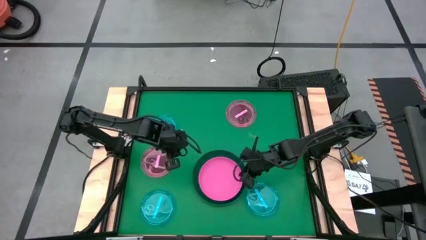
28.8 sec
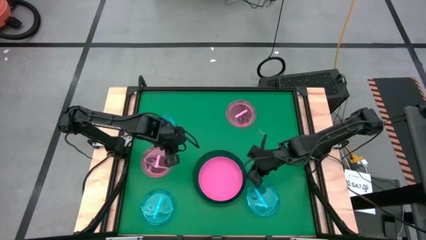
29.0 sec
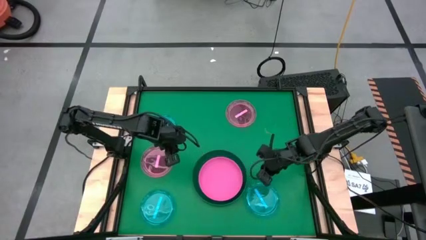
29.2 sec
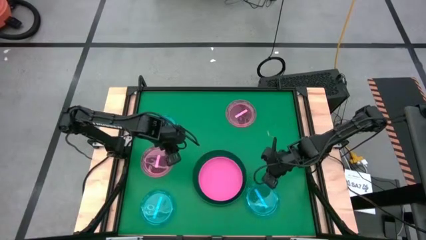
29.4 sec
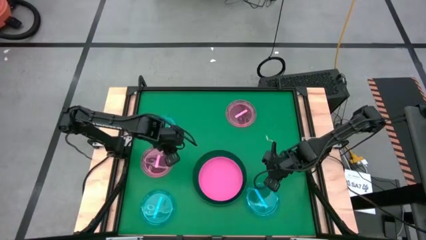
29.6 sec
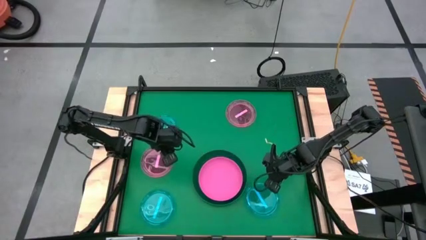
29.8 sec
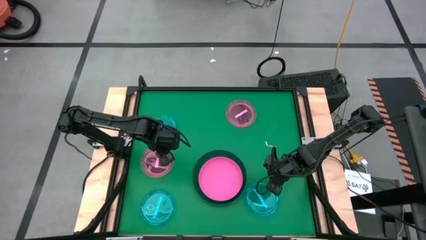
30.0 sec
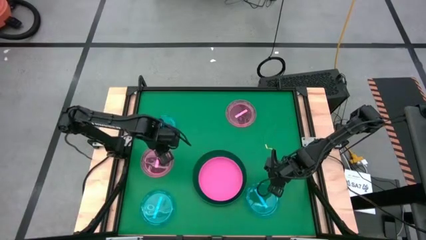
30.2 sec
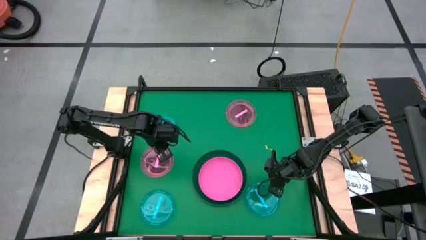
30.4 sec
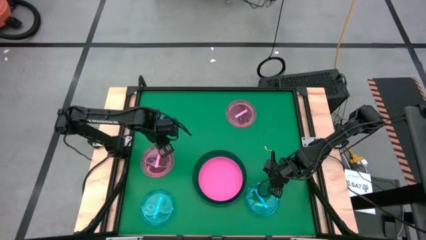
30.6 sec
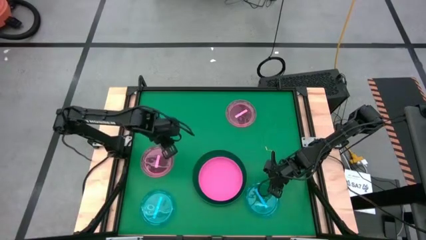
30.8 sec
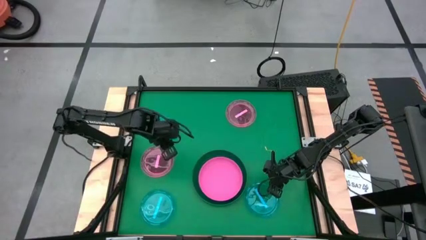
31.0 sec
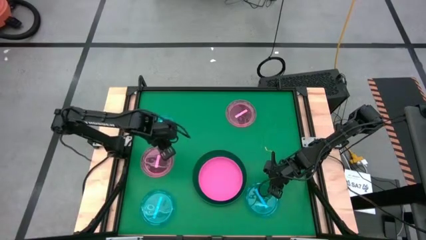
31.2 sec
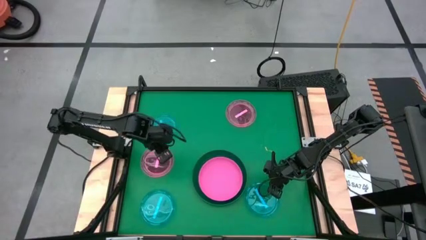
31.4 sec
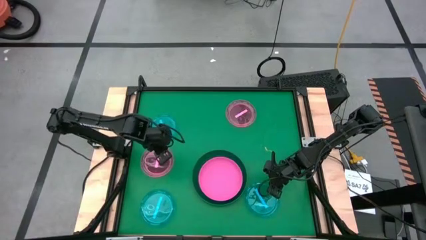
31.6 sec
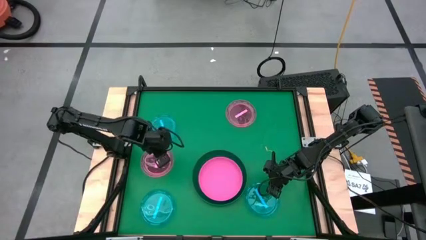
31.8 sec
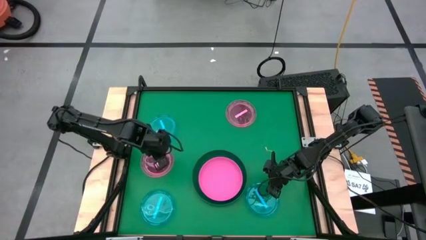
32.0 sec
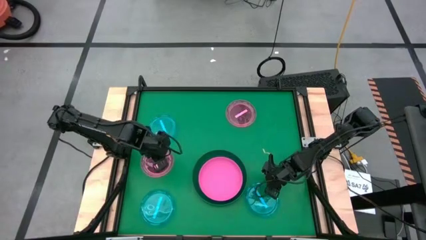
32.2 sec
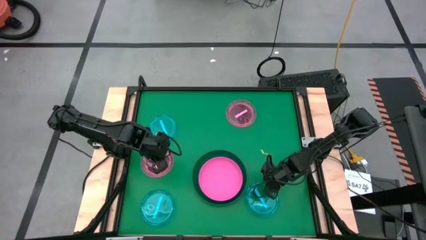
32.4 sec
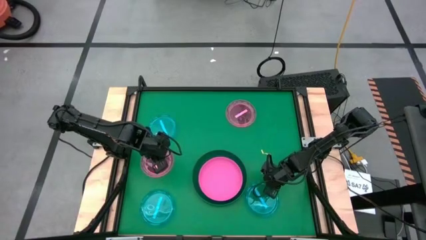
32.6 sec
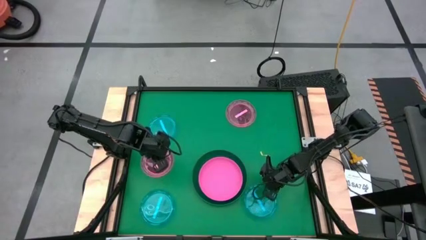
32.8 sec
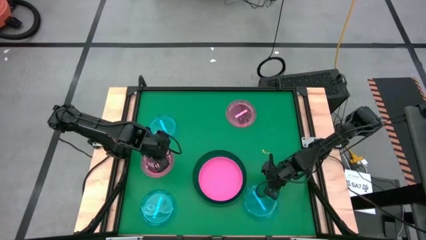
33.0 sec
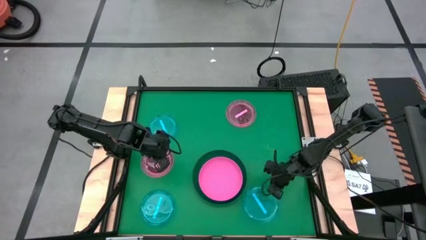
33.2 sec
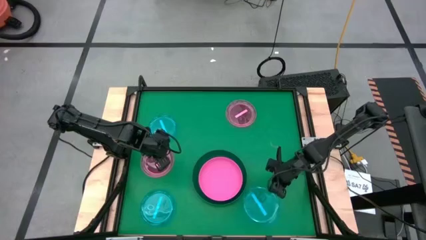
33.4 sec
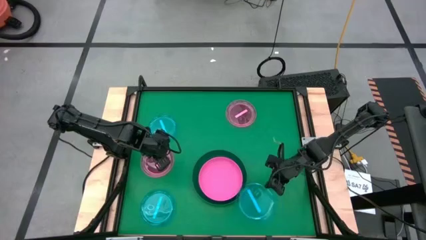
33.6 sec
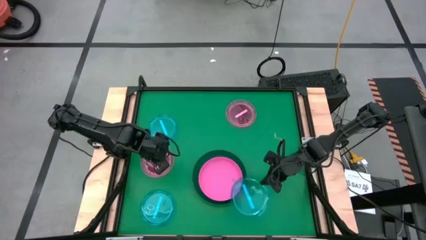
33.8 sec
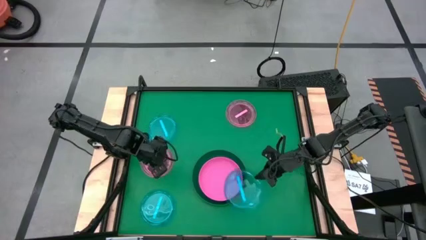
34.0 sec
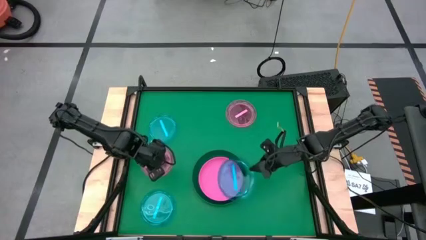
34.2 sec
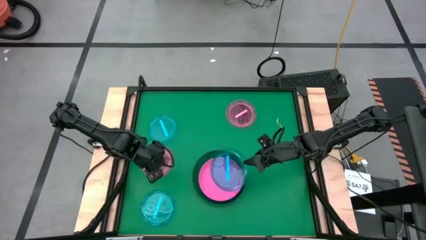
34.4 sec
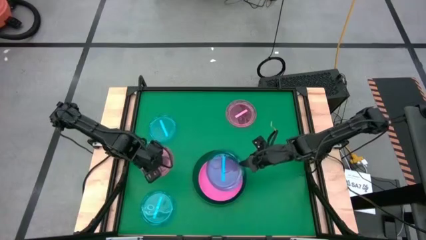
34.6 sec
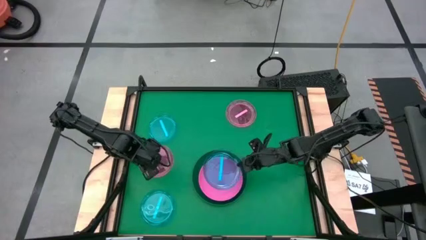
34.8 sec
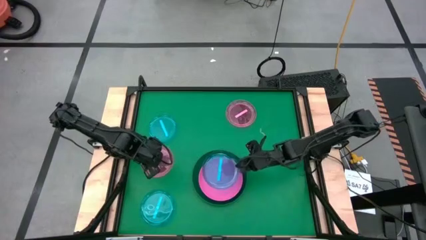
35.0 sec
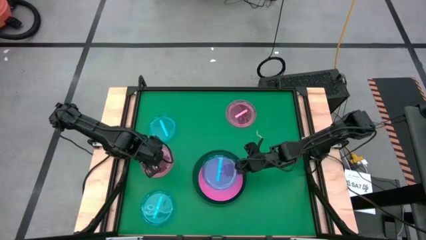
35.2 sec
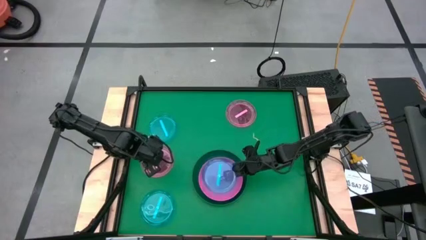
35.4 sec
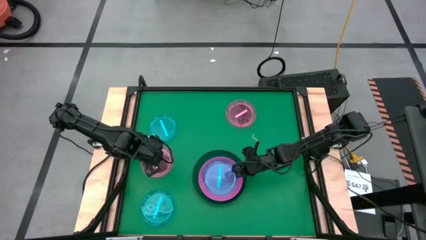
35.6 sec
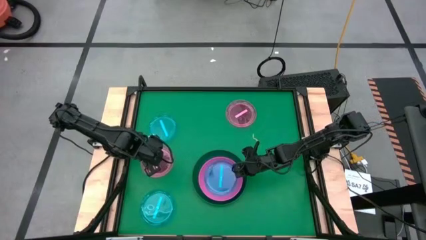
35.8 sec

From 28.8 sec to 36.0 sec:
Task: Stack plastic plates
Stack the bottom right blue transparent plate on top of the pink plate

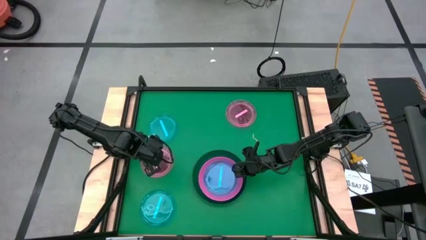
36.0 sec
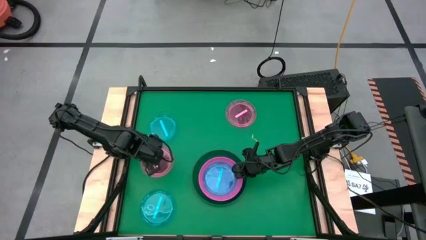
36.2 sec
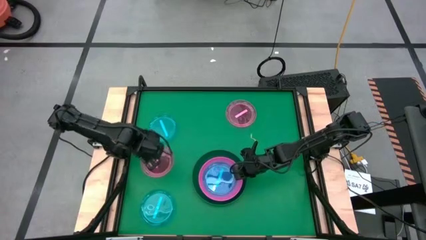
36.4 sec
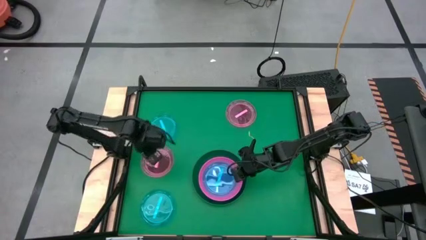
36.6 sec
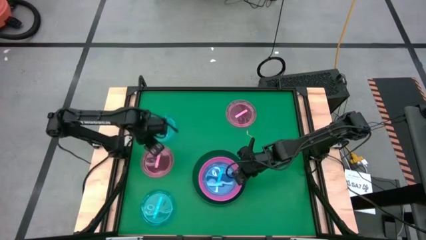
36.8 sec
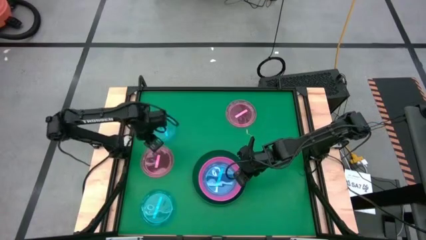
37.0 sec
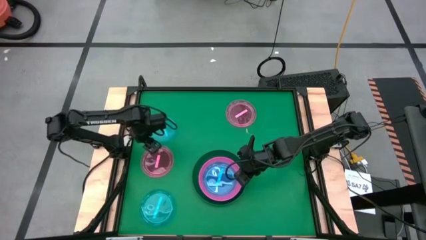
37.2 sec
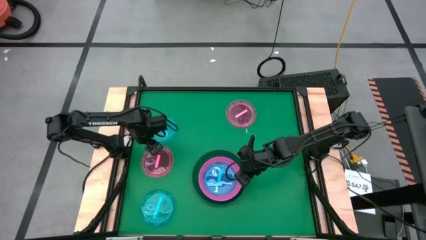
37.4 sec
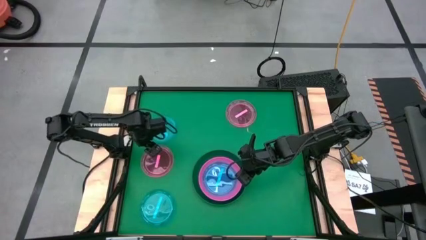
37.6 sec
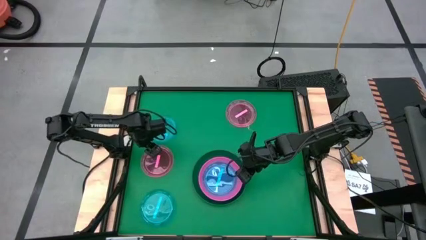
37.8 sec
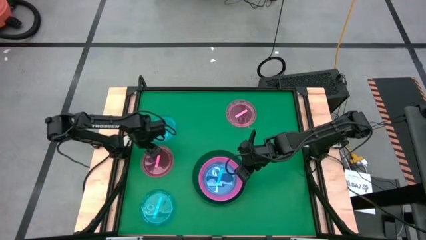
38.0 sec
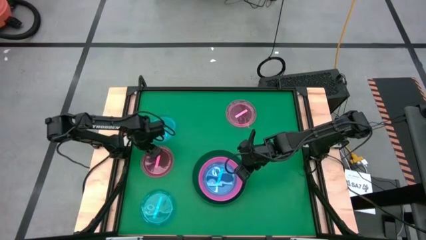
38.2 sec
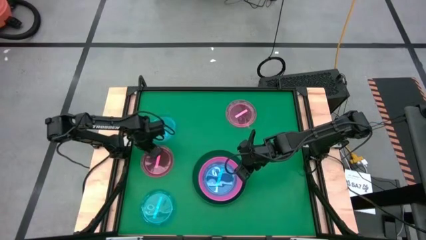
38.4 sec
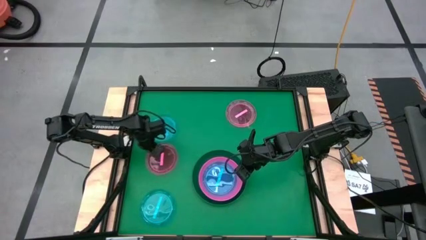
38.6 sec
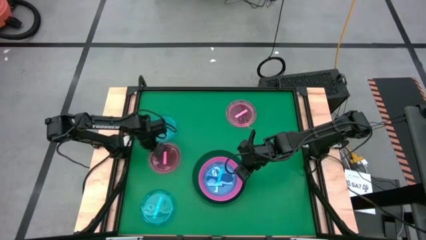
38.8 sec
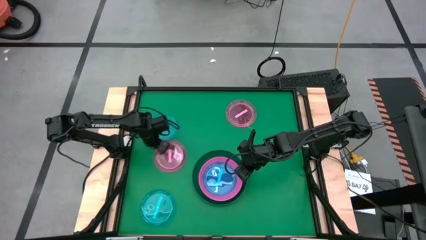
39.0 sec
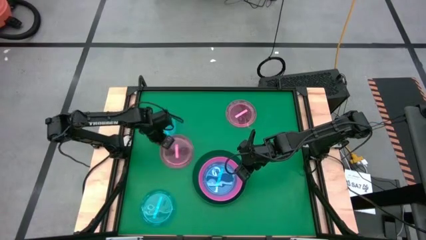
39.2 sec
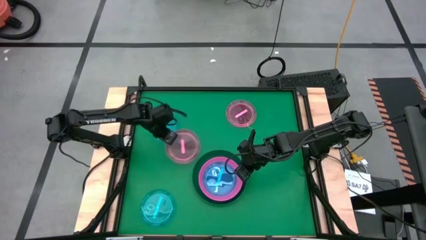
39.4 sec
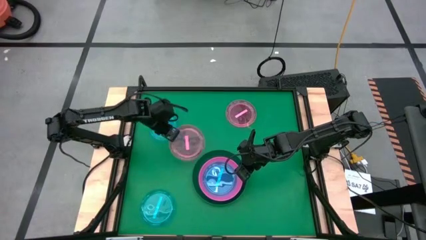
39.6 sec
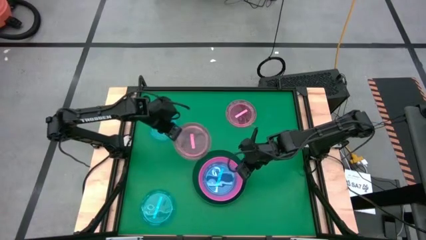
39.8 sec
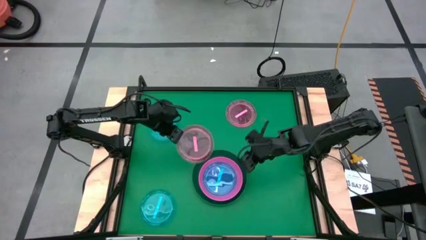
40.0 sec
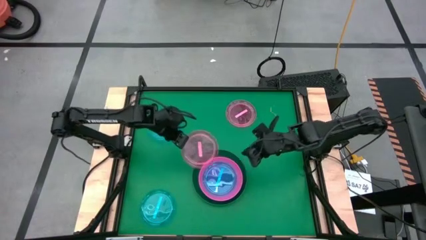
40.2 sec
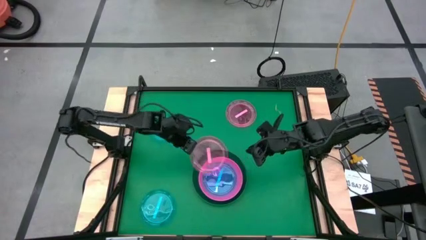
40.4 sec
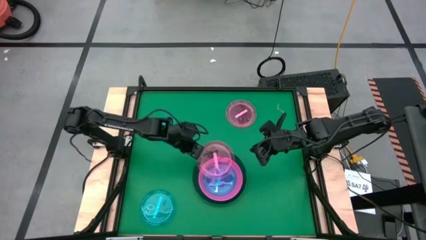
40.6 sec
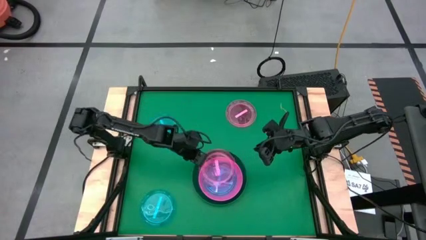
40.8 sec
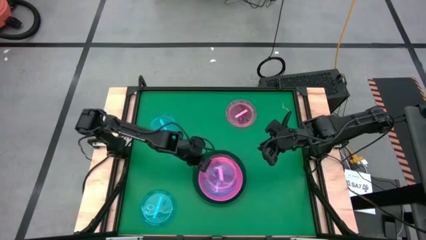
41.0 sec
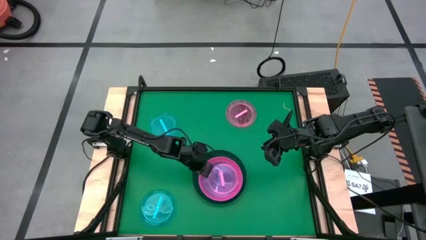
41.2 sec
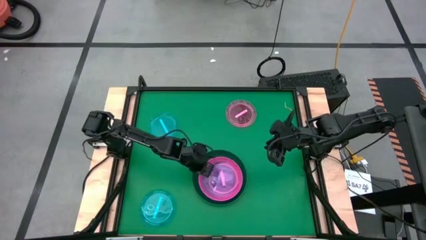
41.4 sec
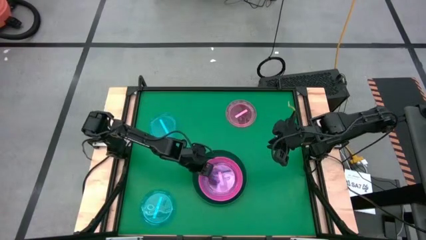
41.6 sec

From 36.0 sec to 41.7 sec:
Stack the left pink transparent plate on top of the blue transparent plate

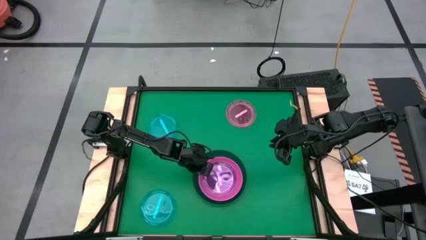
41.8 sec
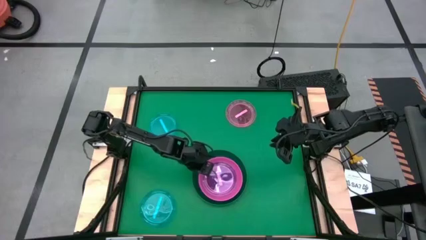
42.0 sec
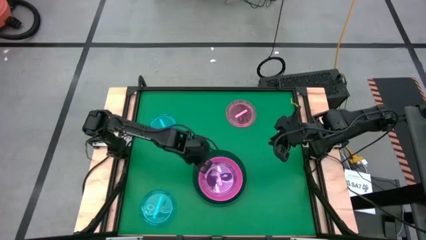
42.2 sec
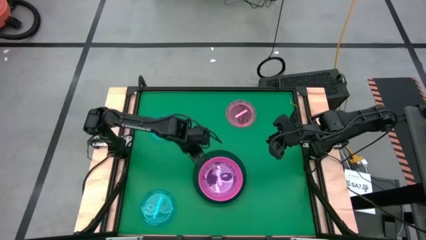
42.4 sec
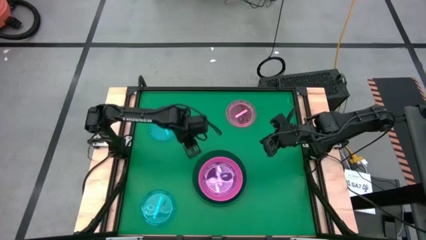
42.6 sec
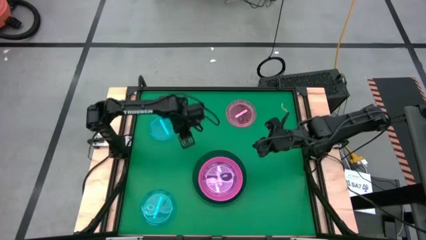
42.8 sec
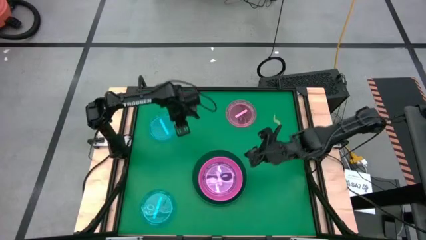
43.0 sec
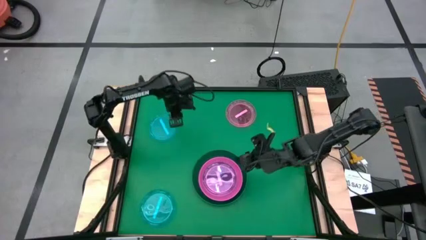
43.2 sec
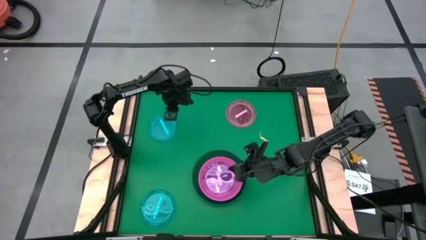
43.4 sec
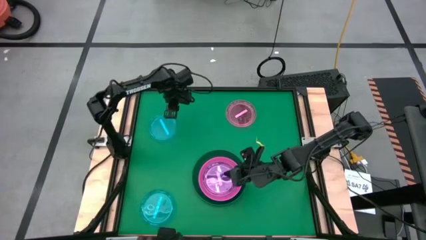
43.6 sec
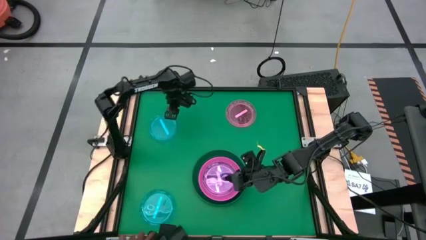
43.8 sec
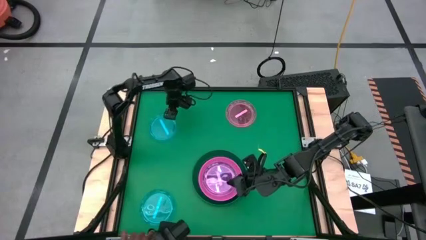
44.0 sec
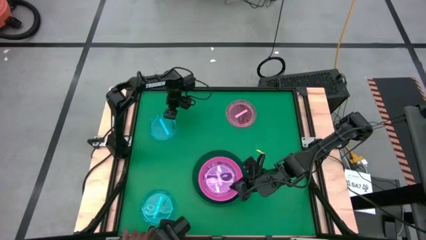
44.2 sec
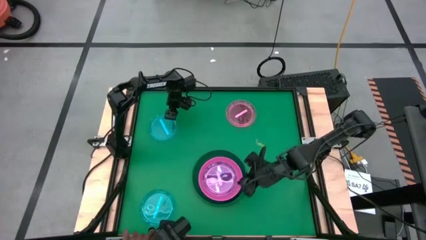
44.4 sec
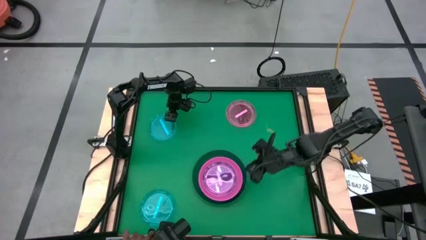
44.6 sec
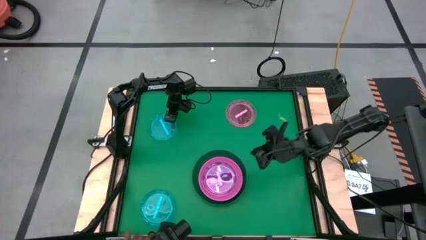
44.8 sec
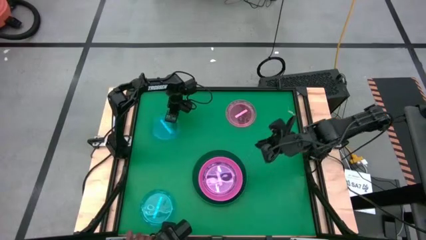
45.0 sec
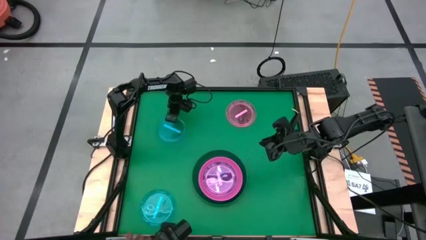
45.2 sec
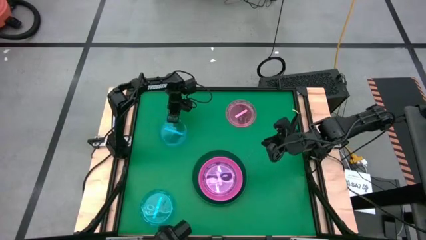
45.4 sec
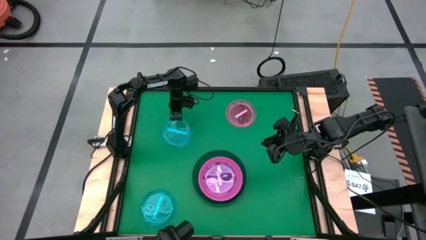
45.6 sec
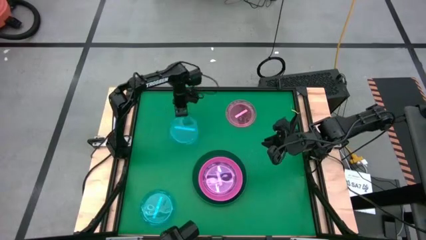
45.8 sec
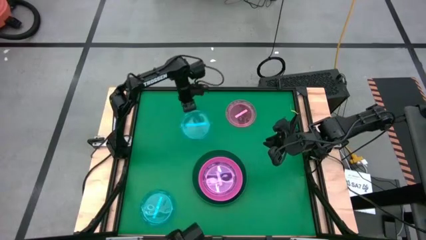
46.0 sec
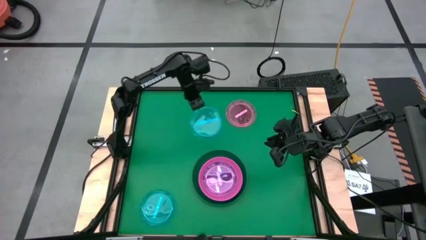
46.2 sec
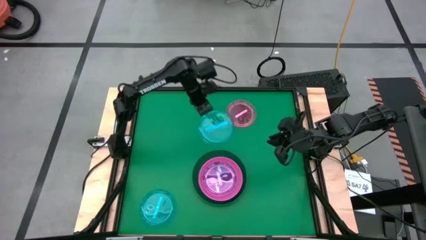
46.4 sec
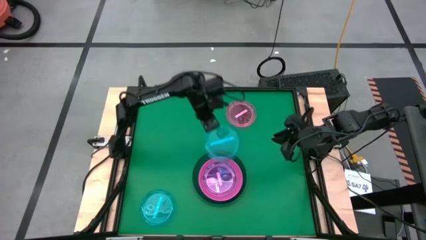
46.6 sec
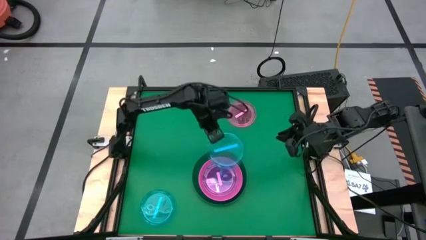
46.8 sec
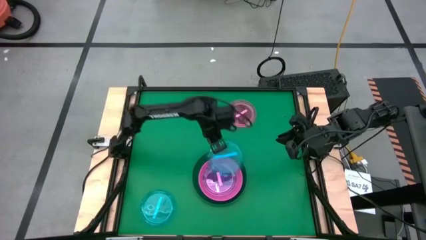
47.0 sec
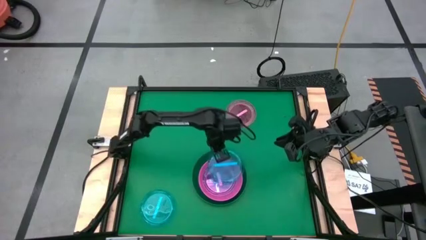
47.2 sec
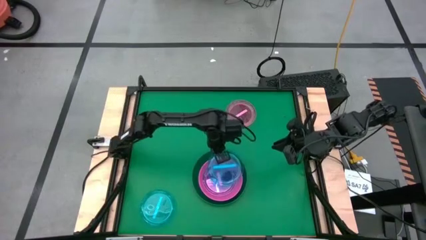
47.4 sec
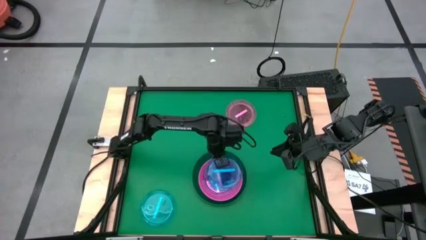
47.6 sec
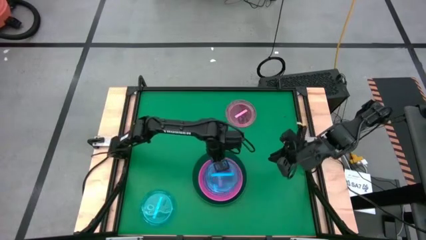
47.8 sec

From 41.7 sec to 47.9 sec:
Stack the top blue transparent plate on top of the pink transparent plate
